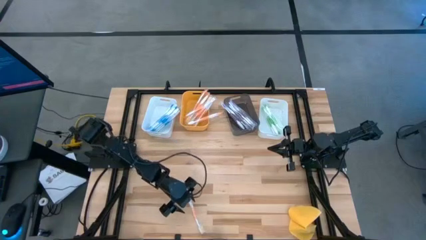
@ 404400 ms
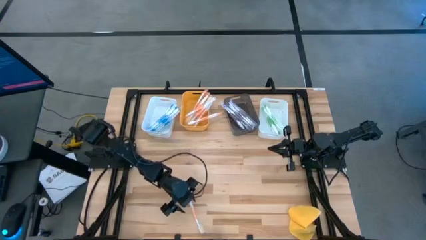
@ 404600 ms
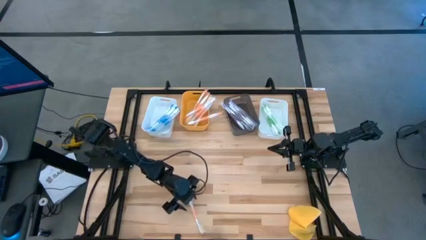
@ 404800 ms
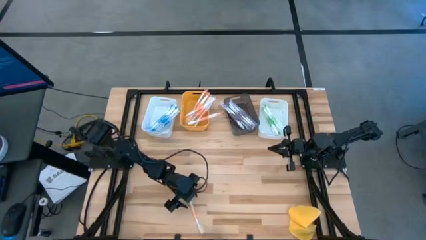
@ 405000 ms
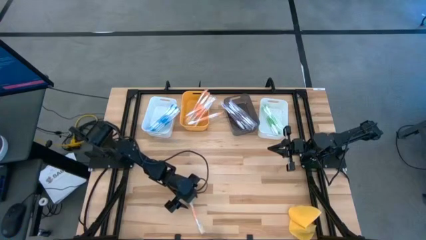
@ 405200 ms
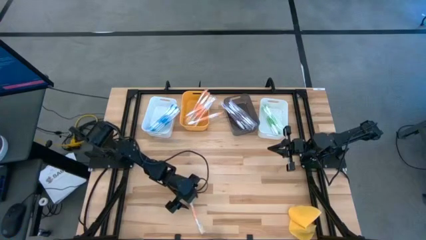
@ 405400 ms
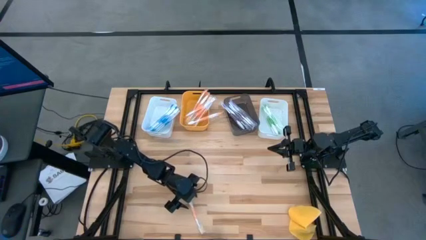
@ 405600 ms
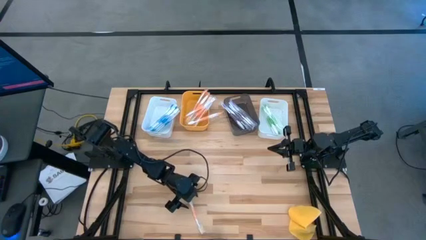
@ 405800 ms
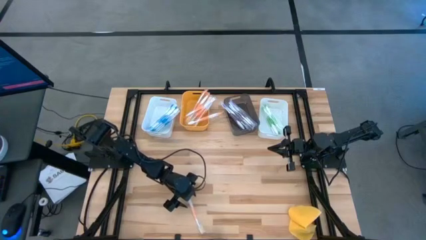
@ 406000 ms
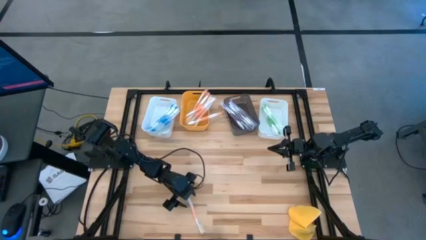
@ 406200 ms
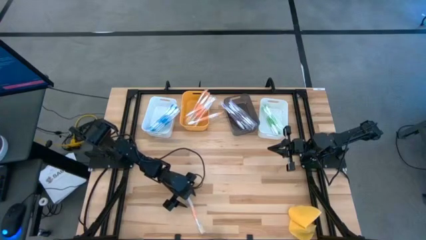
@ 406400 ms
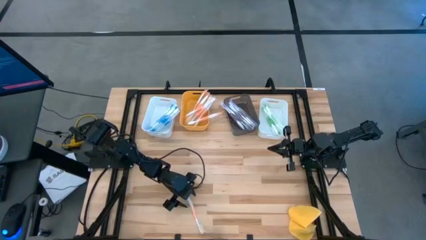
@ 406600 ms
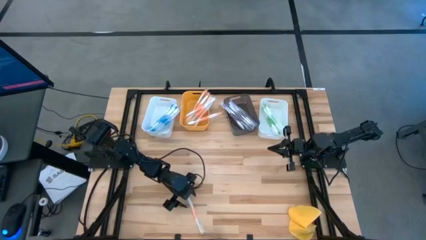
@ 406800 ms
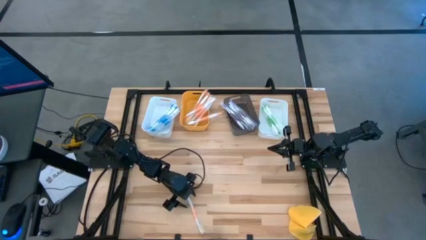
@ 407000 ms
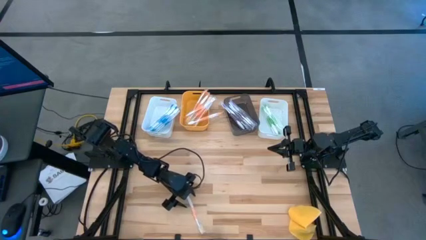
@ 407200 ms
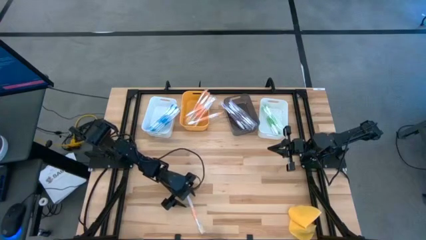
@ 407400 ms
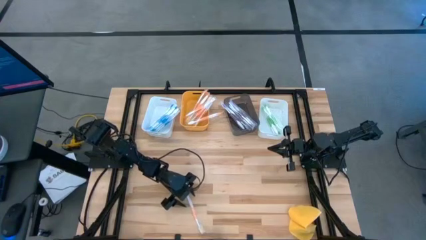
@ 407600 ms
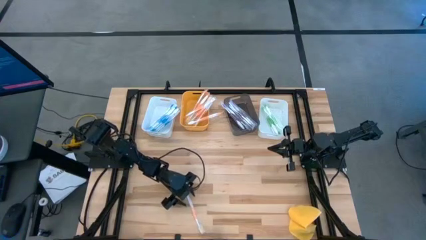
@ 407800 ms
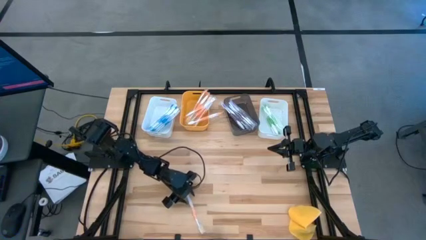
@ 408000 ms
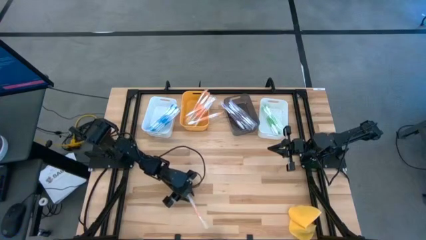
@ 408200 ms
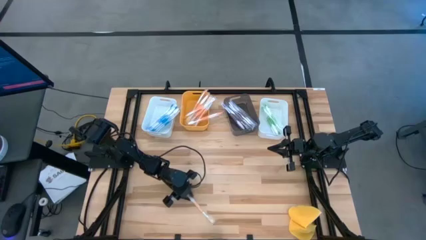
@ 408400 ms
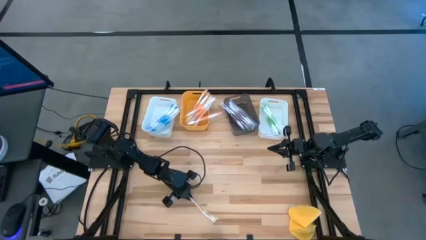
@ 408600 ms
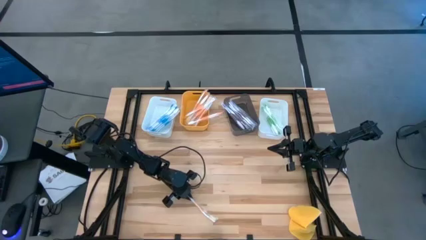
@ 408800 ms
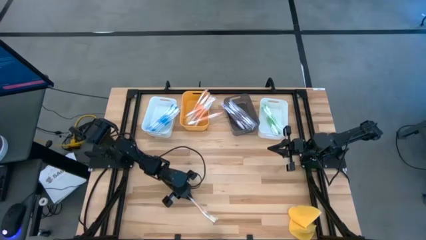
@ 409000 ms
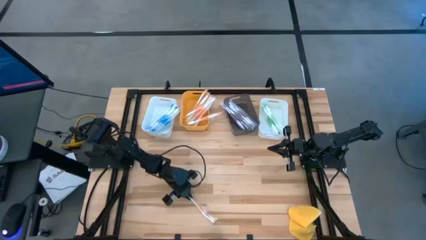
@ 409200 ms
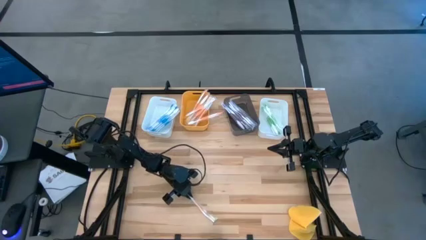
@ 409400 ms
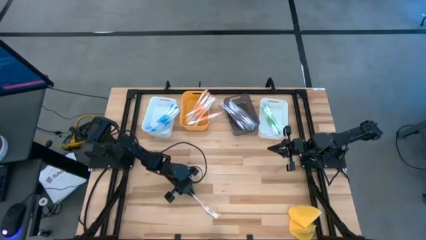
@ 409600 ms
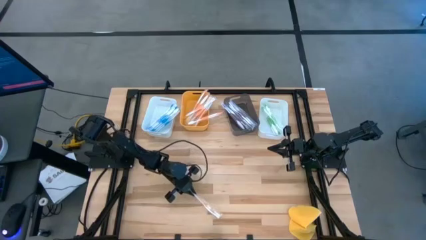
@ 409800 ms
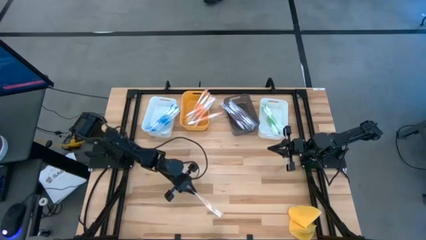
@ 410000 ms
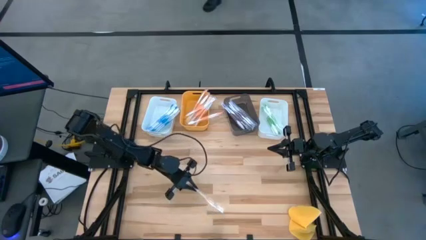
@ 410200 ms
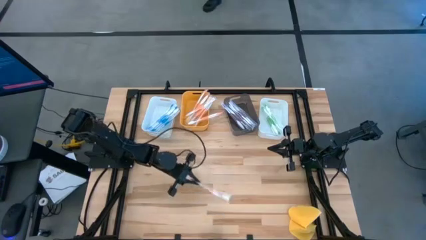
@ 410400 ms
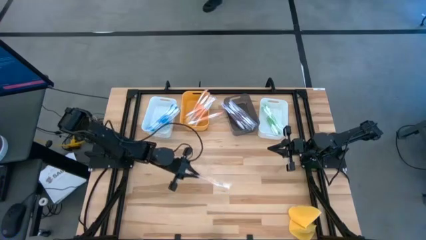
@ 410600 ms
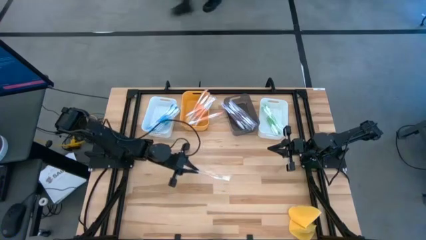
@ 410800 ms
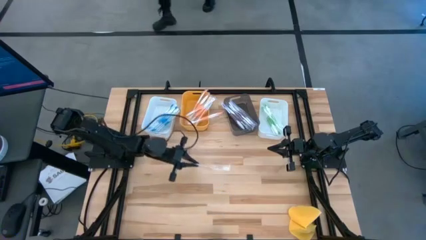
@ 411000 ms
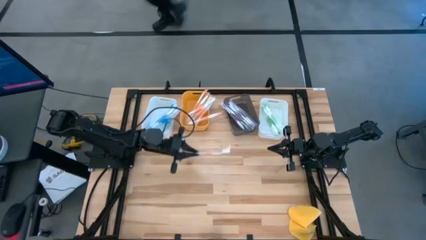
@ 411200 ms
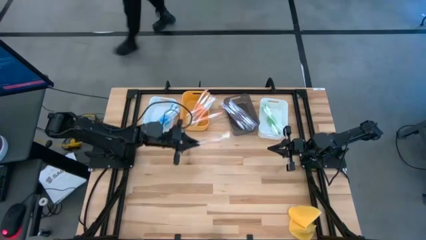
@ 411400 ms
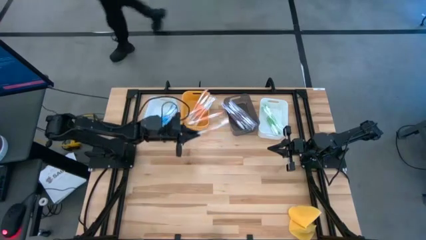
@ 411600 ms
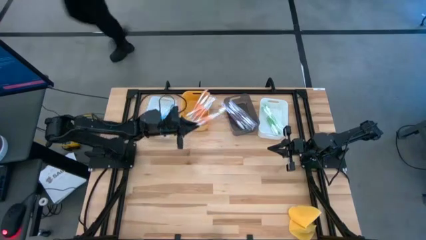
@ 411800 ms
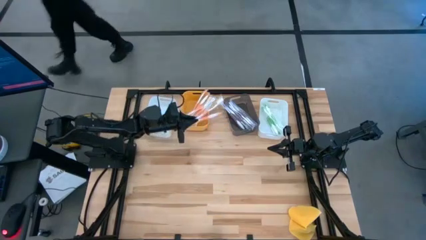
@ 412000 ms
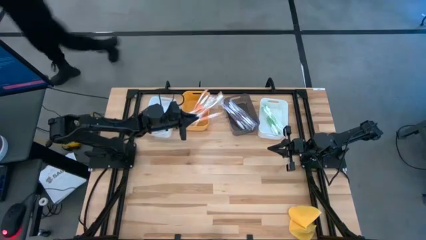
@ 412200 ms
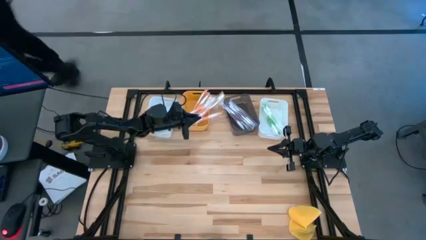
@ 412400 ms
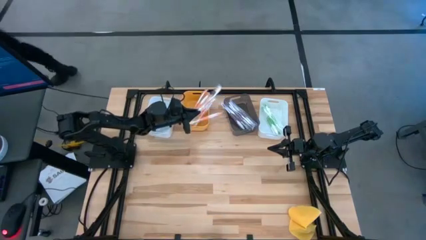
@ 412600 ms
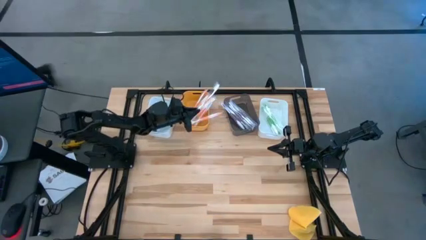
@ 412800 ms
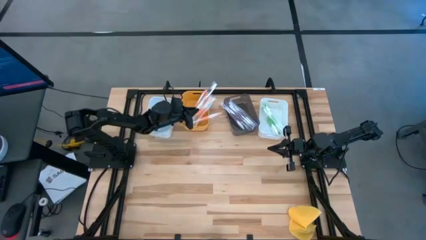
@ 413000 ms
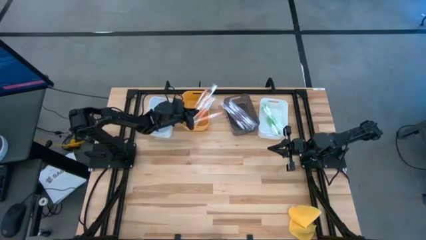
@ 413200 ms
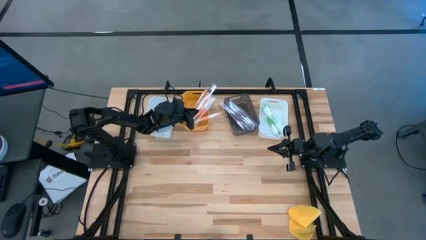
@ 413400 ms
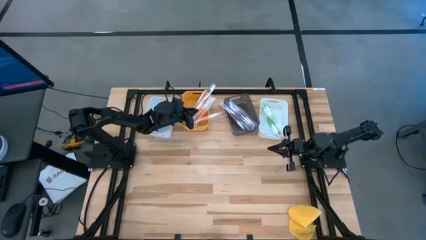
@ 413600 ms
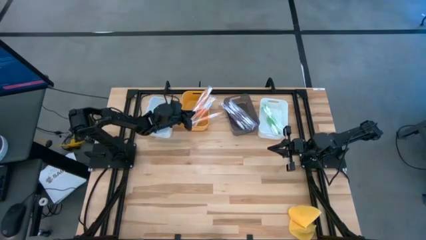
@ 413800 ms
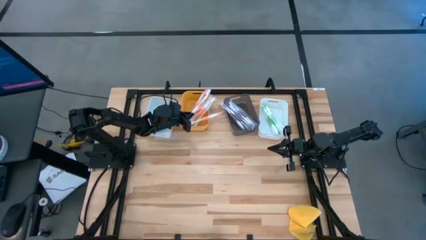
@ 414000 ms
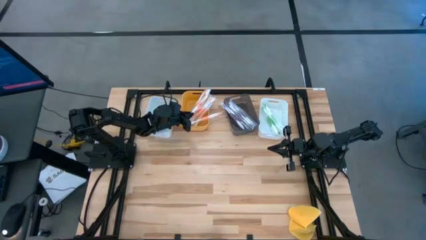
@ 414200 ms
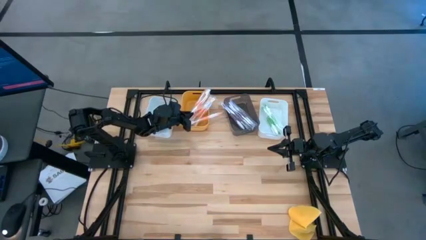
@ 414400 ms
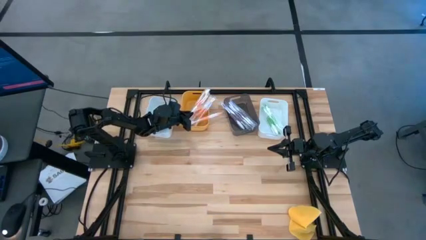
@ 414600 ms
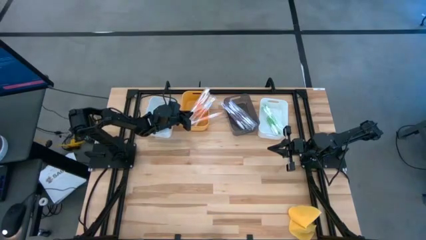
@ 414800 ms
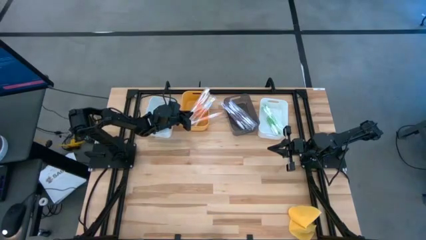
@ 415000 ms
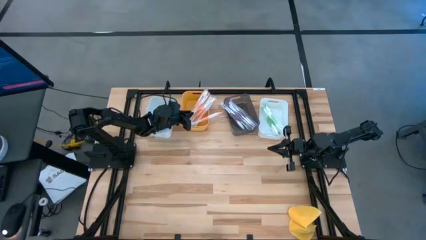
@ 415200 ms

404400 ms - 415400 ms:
Task: Pick & Place Toothbrushes
Put the orange toothbrush into the yellow bin

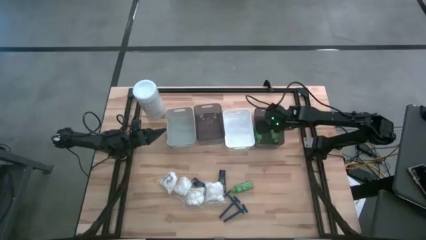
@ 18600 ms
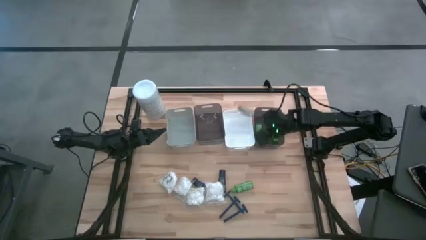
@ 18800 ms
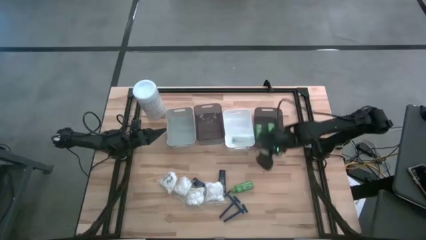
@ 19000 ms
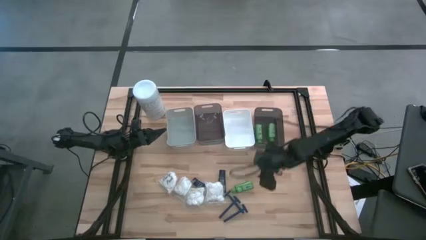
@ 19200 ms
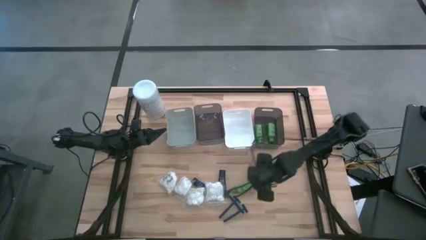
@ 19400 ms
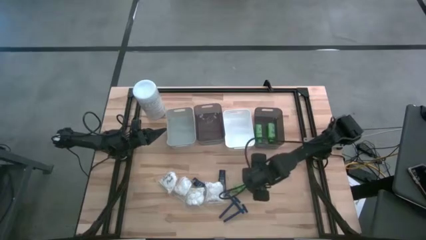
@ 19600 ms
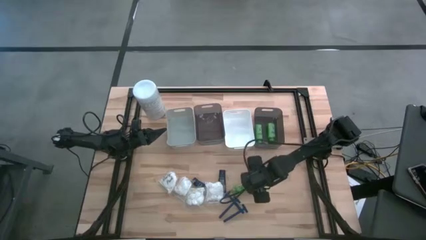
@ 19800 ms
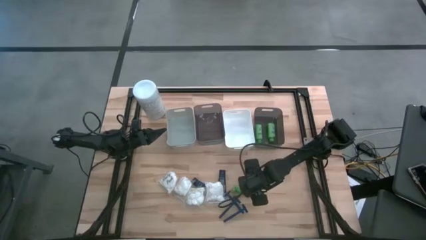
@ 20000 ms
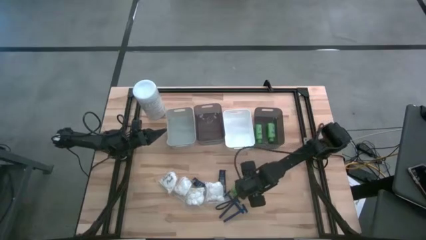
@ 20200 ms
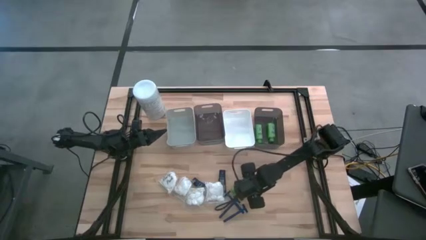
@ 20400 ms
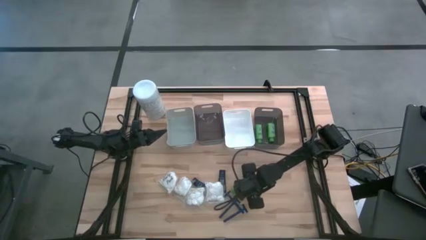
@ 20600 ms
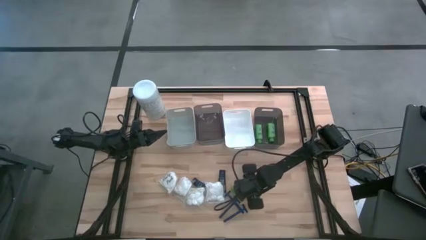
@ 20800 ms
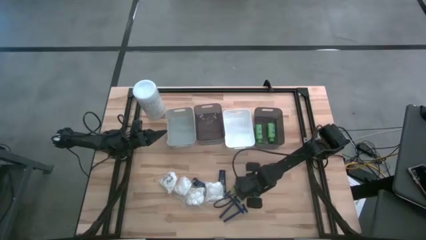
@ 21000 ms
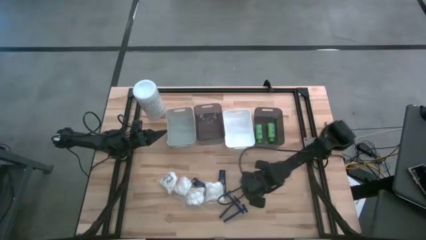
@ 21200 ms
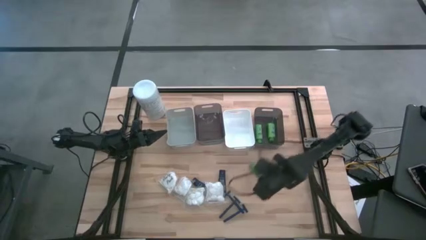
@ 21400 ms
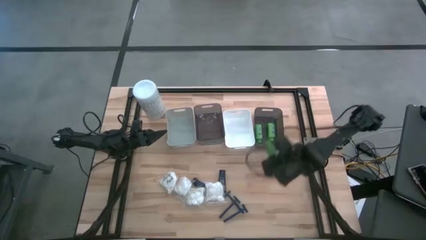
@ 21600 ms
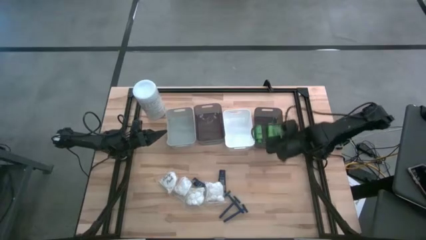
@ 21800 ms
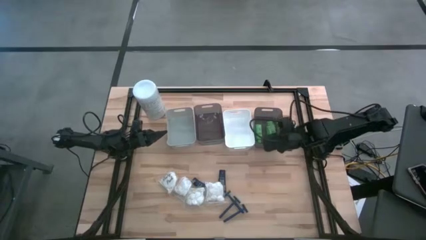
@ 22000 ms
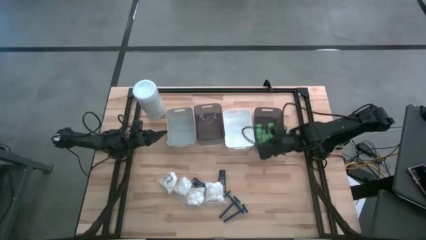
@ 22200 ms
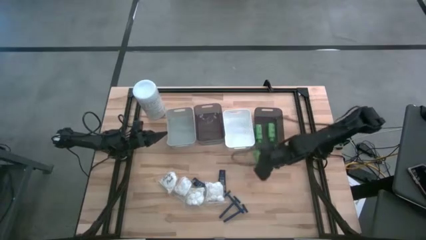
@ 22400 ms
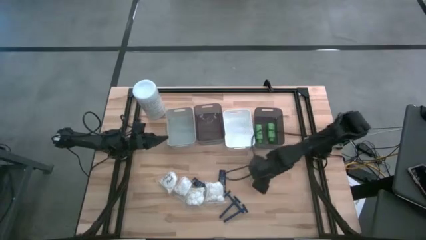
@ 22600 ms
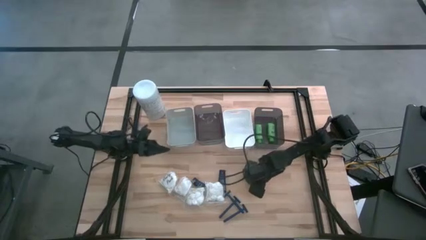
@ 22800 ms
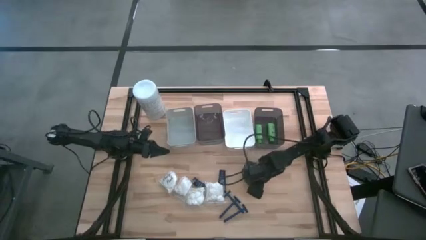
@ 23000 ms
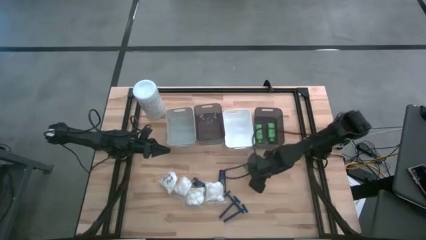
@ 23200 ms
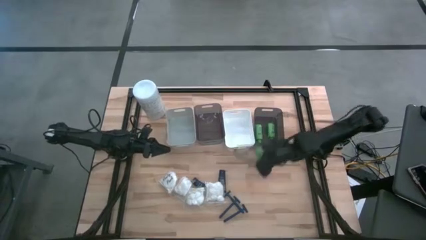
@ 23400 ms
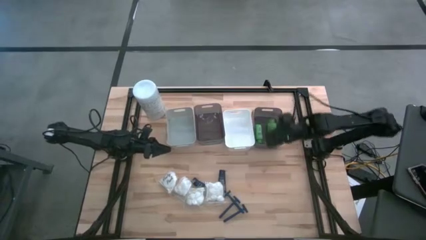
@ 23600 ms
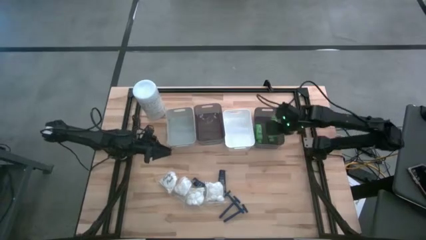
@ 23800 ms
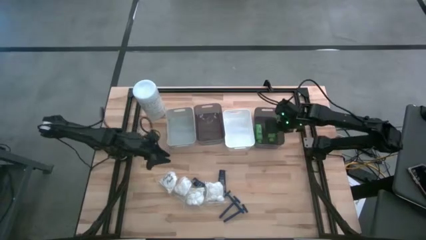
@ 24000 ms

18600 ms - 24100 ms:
Task: Pick & Place Travel size toiletries
Put the shampoo in the right black bin
